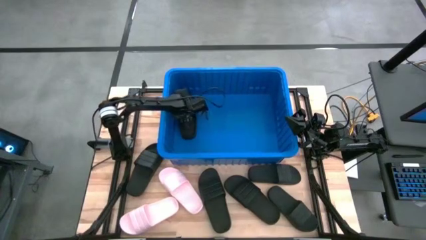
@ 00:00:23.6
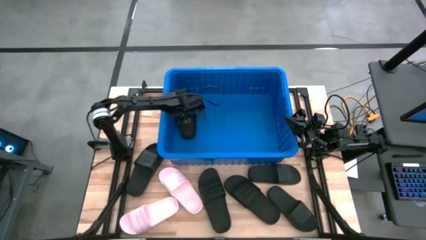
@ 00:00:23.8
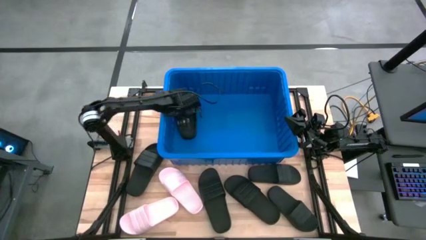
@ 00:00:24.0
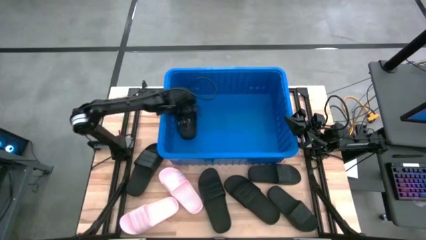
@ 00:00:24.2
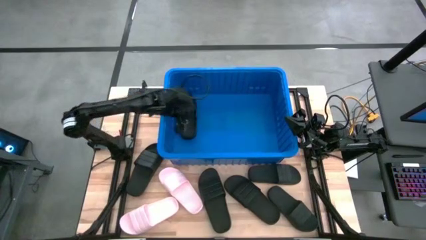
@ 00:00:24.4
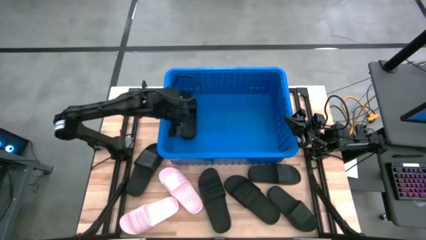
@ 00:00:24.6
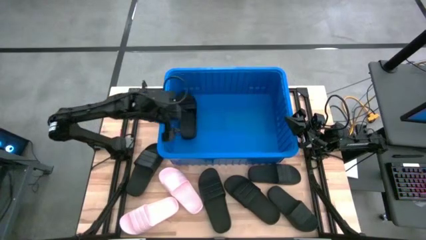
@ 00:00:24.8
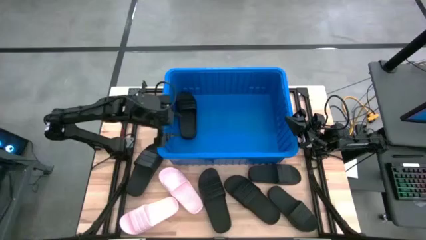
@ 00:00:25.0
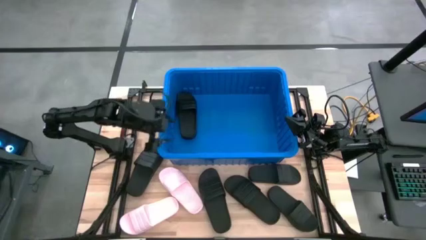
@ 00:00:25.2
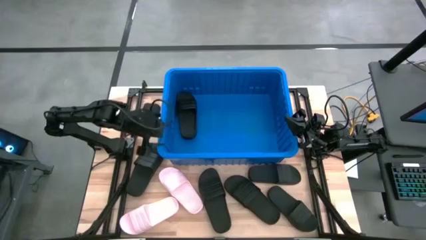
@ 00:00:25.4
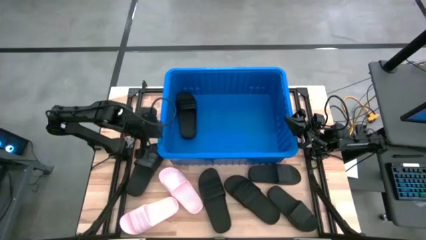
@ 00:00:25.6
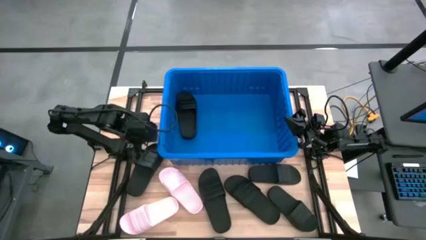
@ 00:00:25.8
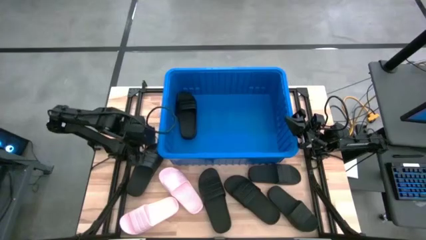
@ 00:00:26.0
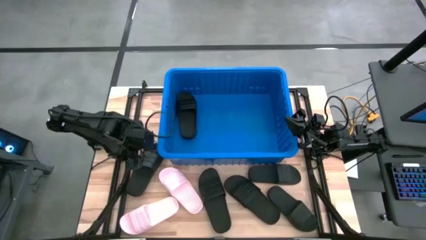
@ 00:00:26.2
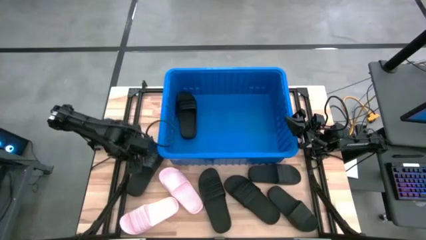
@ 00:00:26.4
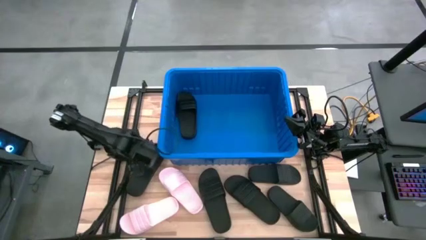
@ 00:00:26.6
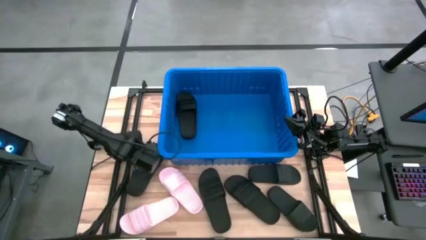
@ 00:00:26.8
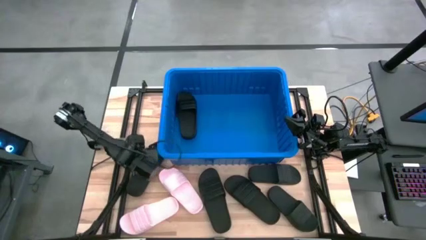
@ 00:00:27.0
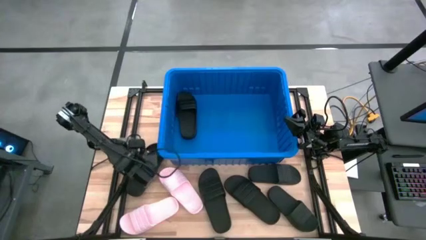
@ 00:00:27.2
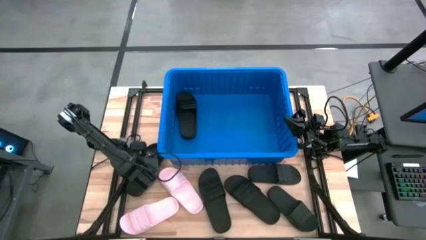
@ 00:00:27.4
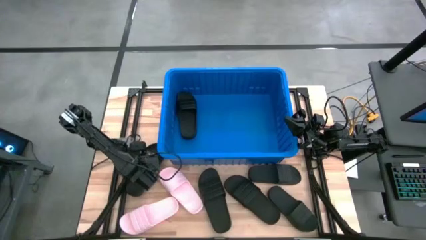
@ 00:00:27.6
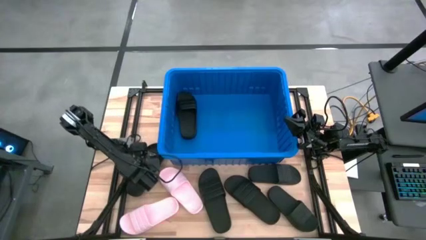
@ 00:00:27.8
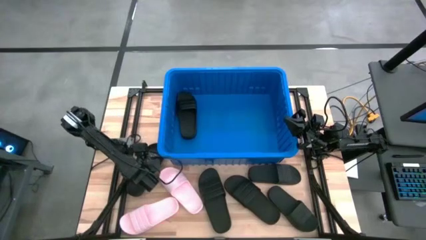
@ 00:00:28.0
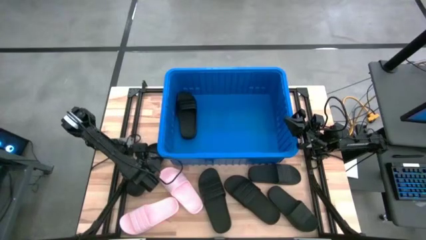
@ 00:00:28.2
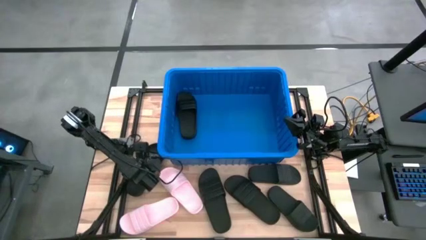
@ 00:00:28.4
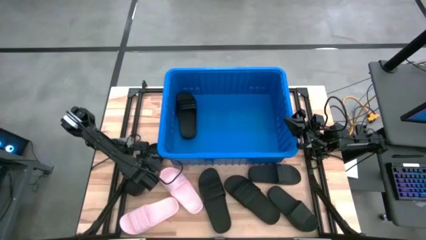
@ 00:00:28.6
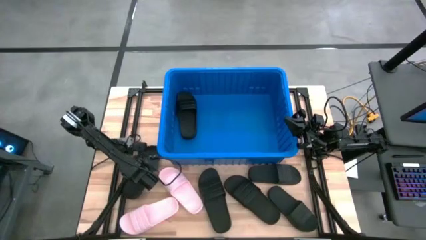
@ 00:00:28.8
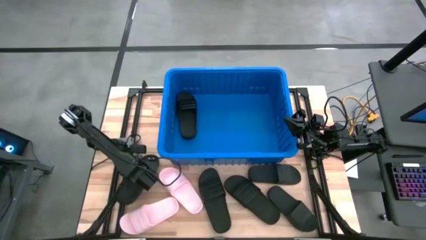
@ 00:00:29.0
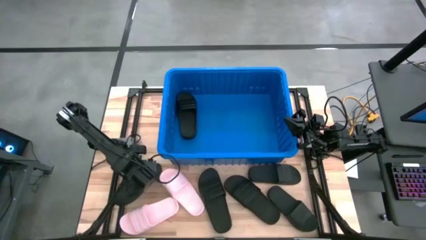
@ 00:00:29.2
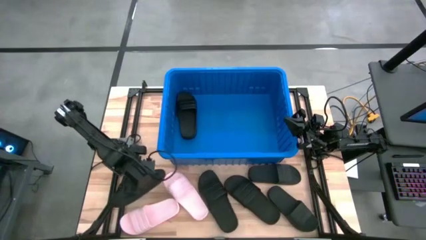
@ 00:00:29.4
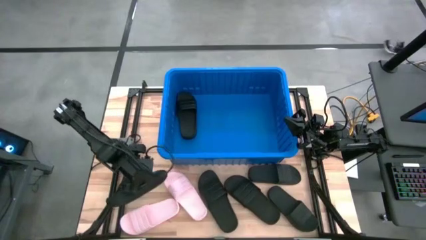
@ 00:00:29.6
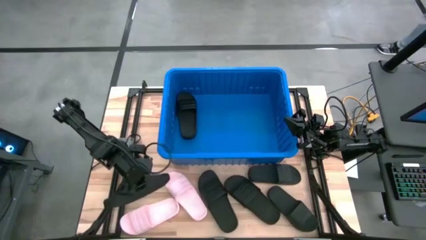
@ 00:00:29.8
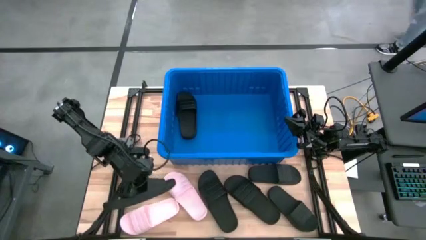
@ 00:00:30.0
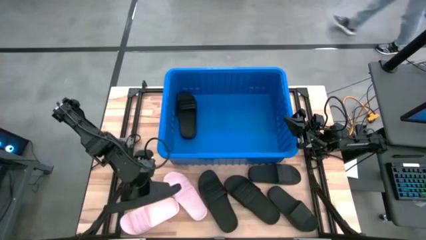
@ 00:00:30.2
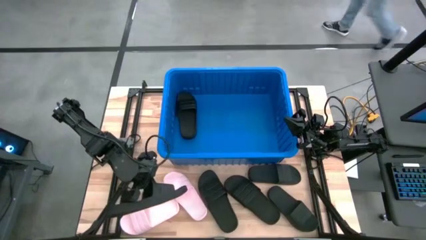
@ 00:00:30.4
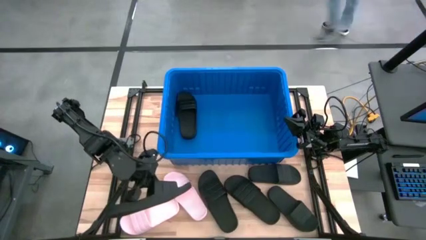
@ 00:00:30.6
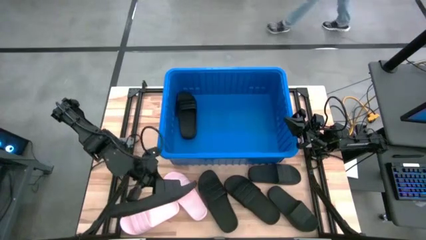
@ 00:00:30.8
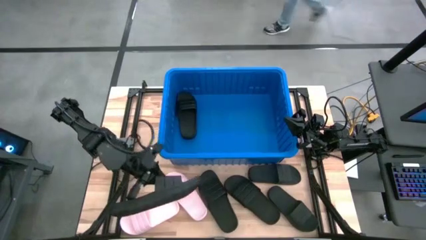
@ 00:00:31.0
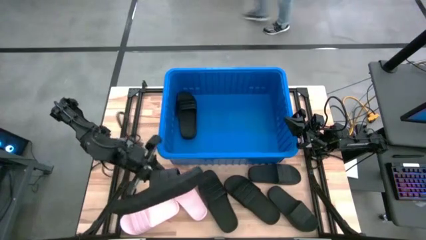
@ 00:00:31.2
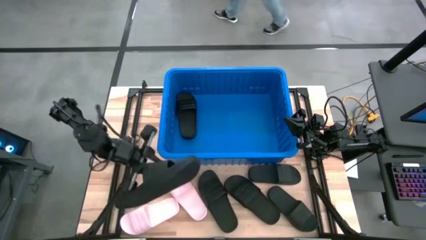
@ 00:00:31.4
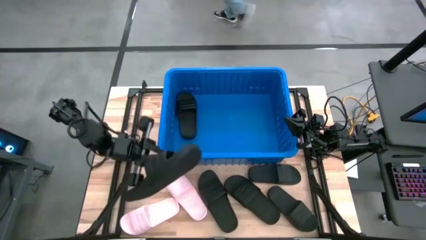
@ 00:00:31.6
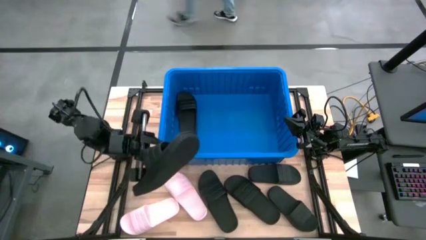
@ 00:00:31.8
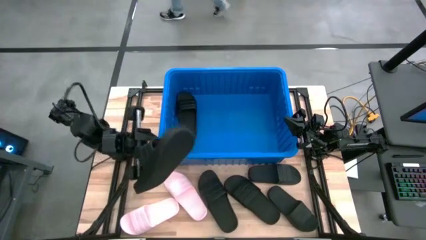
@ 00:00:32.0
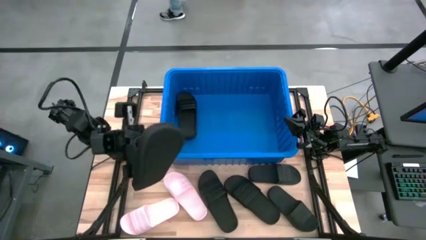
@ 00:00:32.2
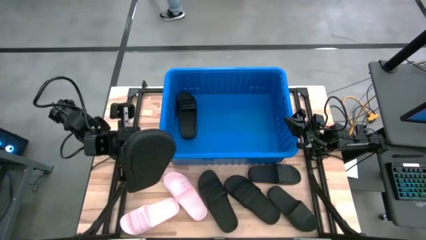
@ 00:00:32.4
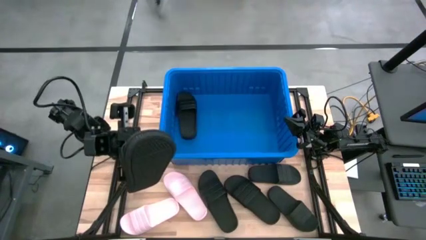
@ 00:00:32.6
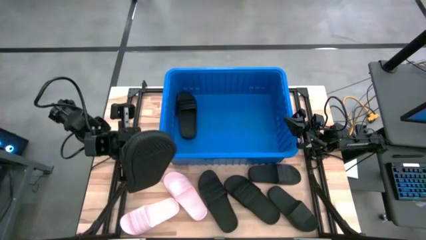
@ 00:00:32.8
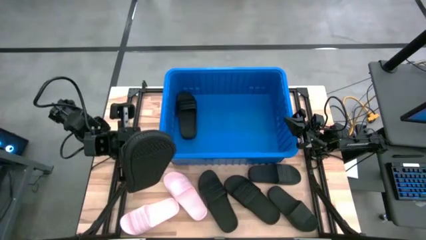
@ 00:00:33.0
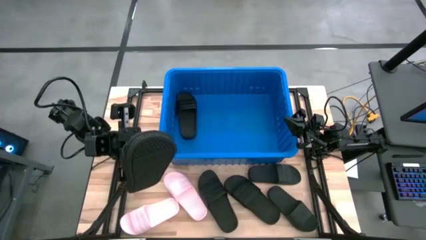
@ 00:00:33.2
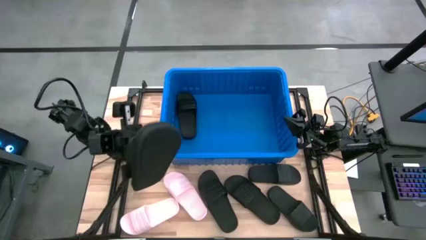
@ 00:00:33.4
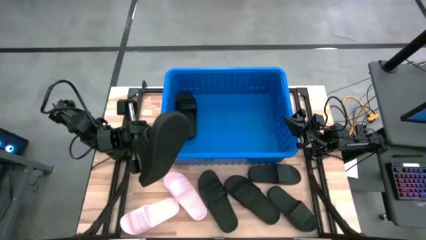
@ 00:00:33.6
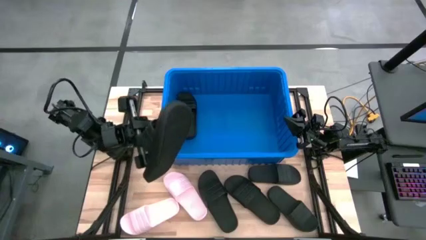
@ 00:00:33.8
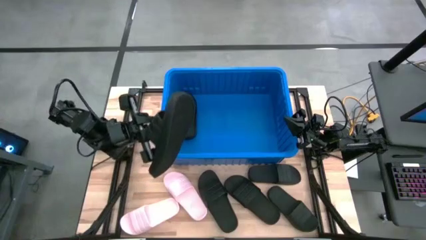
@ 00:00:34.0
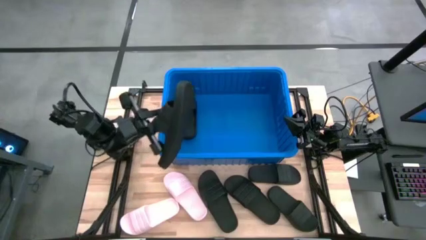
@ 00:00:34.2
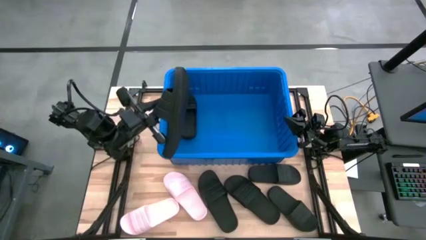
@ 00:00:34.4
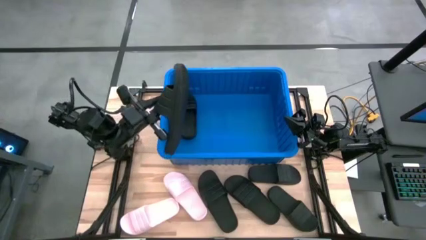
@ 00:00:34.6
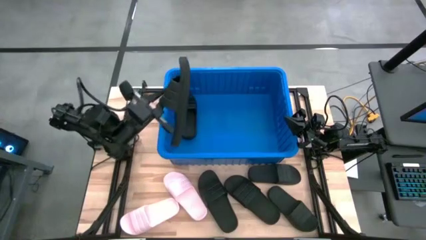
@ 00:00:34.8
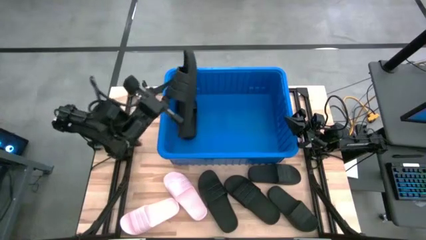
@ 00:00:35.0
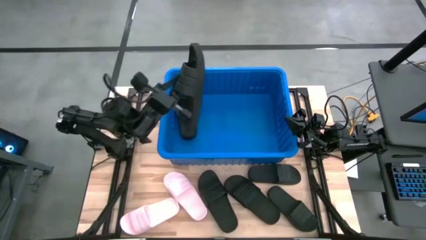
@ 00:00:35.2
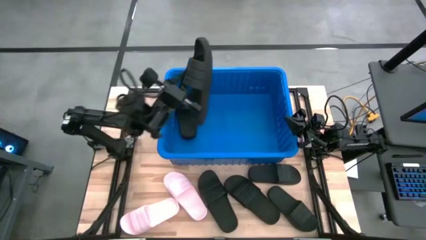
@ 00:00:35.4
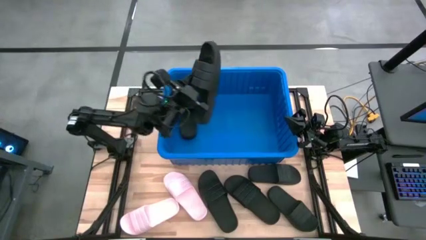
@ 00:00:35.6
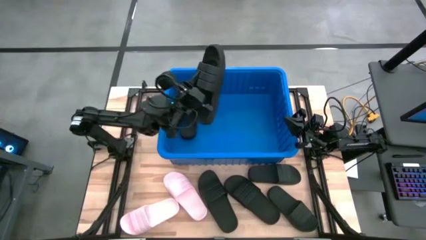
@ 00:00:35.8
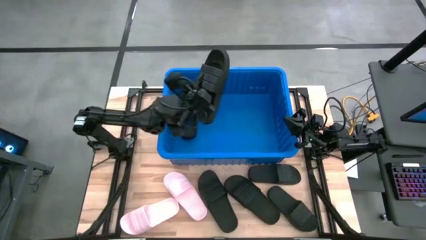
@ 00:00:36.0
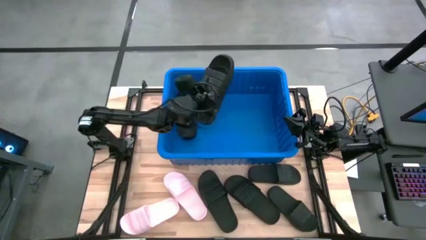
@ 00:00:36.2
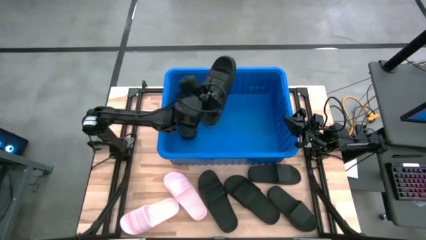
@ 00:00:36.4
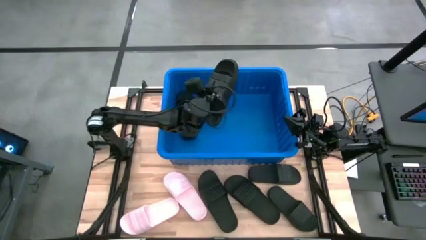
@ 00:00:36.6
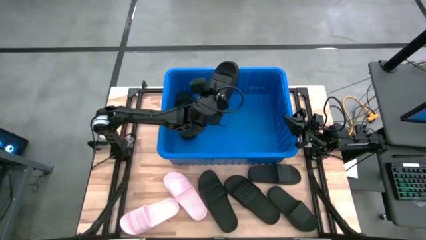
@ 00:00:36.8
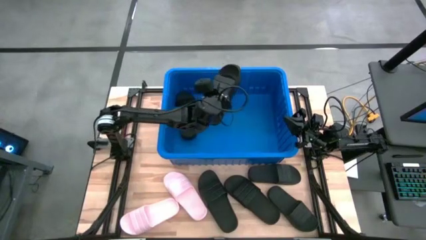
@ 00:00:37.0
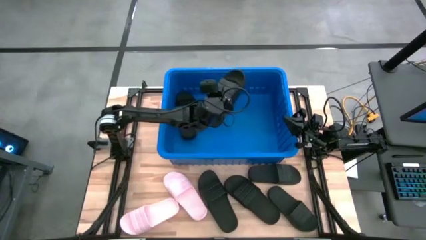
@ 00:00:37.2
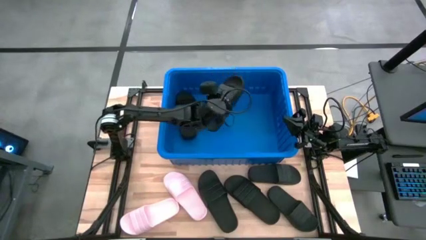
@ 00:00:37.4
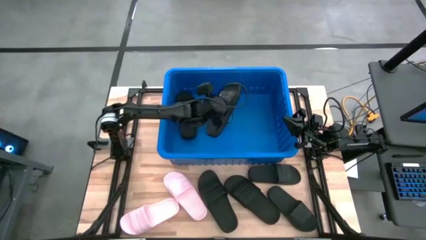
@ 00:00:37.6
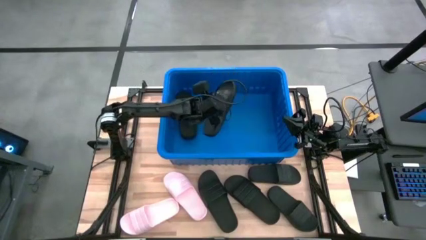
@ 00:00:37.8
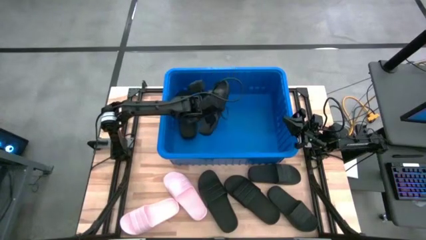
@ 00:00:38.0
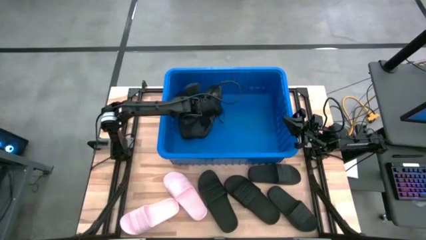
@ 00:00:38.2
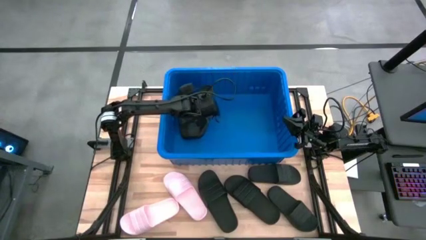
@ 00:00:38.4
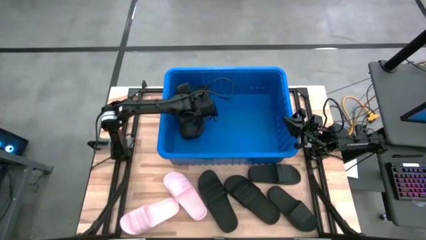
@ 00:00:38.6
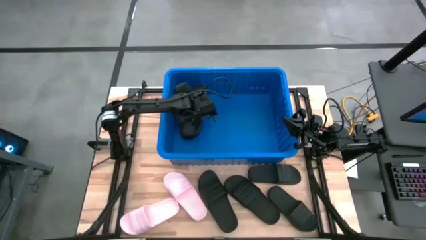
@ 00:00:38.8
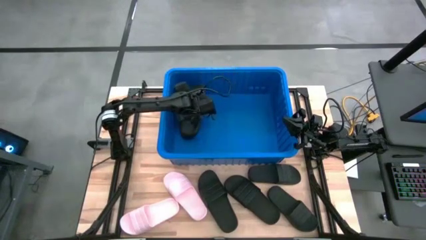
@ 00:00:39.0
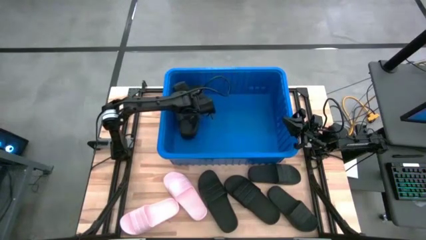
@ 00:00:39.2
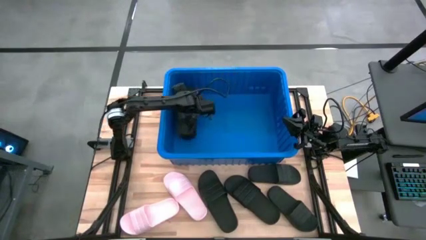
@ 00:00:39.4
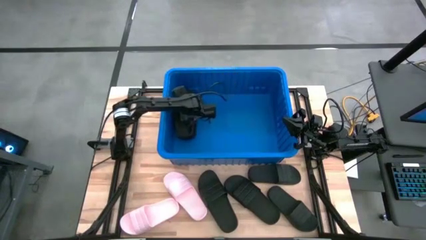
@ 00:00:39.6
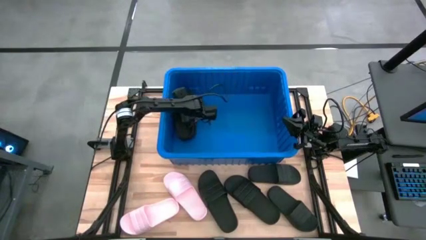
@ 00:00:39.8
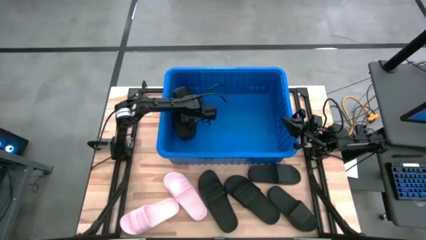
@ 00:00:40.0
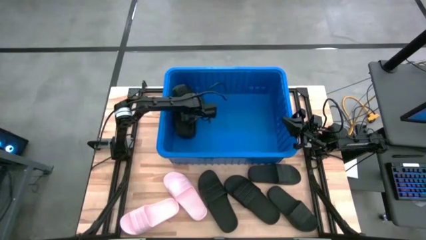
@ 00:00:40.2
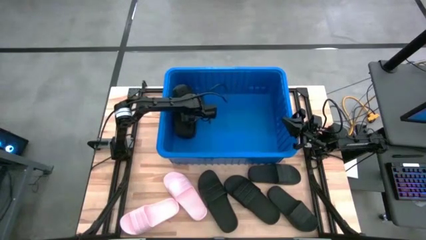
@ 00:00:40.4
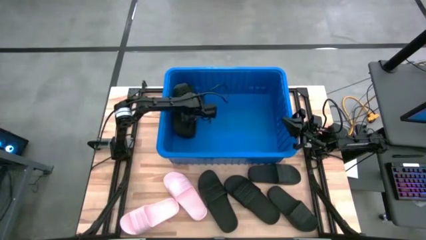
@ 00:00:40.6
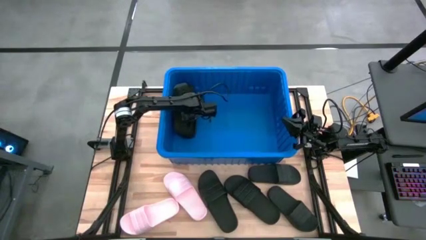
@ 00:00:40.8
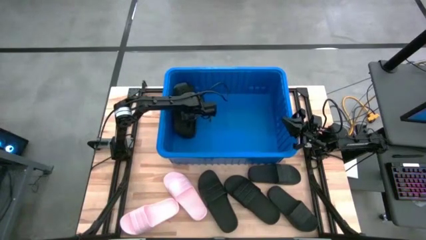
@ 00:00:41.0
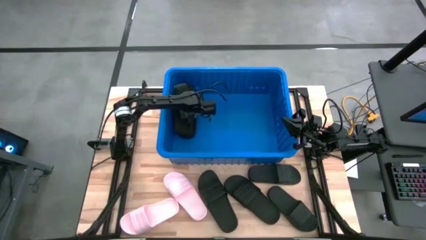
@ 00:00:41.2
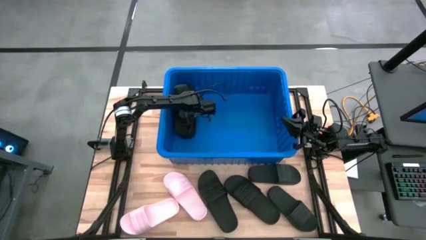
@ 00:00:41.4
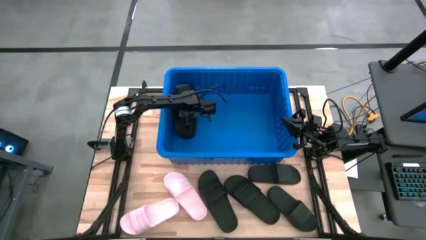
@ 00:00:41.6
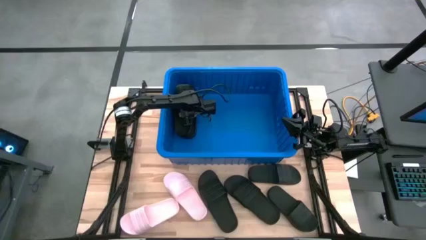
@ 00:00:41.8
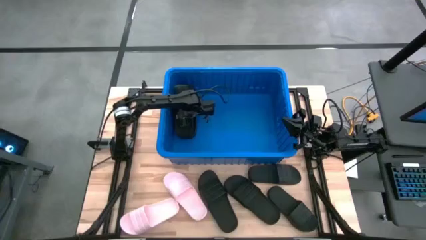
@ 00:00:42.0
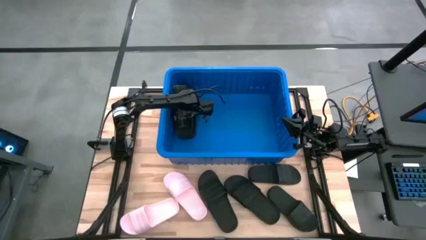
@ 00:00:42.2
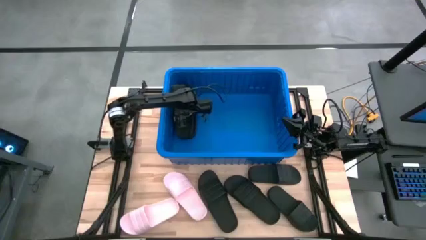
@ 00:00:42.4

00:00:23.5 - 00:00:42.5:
Task: Pick and place slides into bin
Put the black slide into the blue bin
